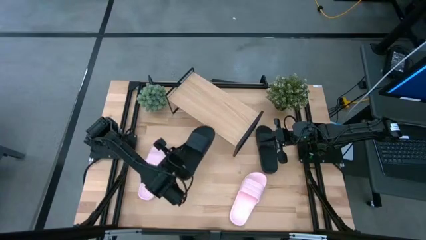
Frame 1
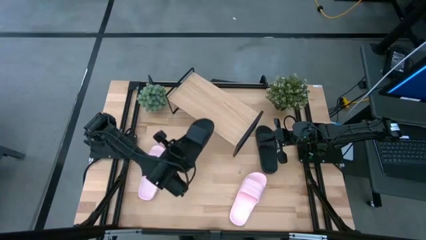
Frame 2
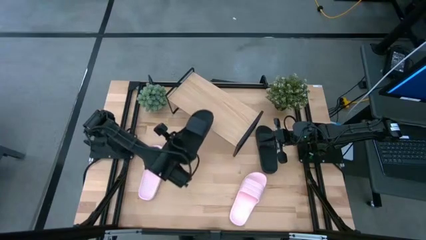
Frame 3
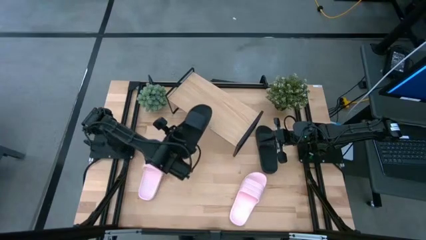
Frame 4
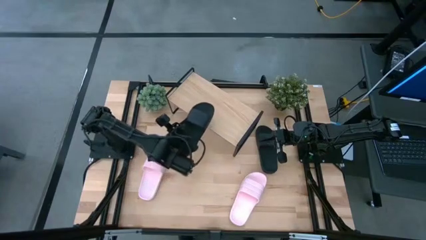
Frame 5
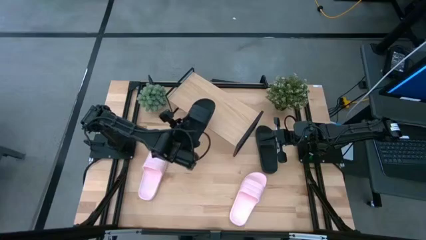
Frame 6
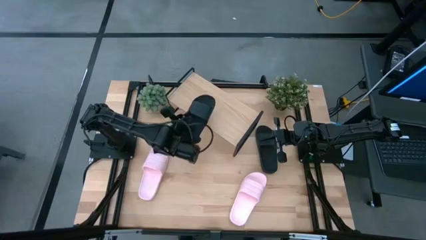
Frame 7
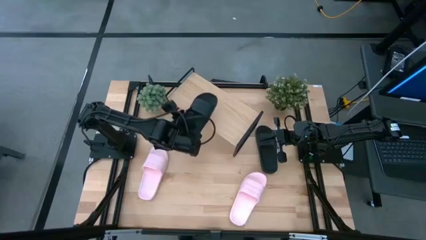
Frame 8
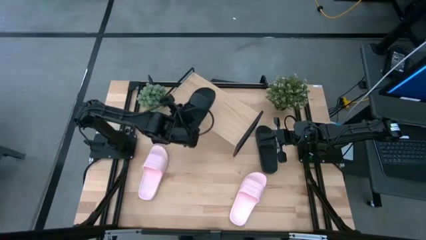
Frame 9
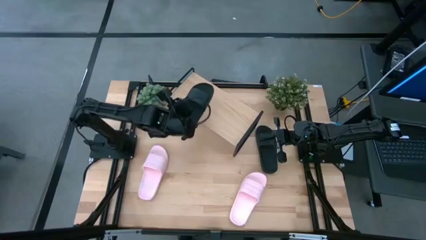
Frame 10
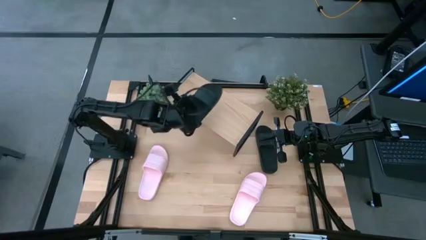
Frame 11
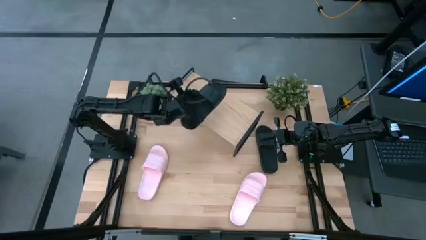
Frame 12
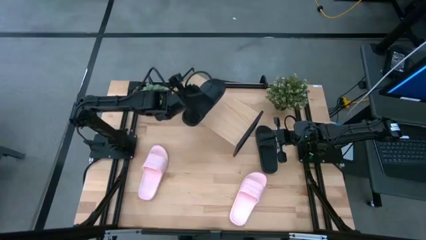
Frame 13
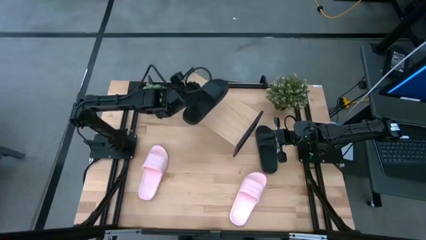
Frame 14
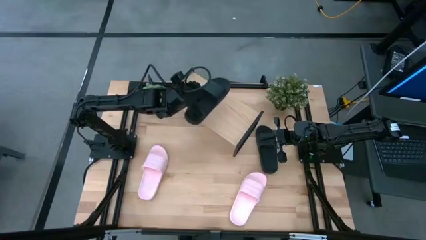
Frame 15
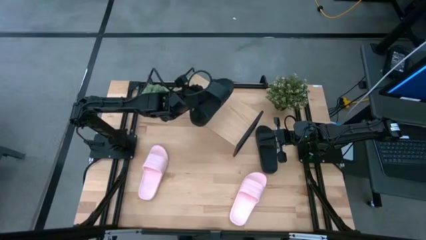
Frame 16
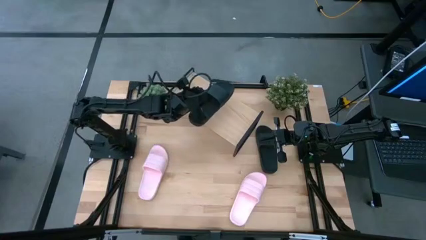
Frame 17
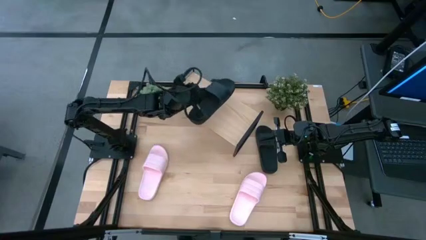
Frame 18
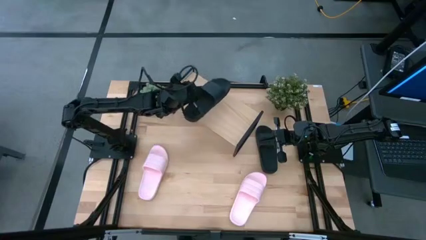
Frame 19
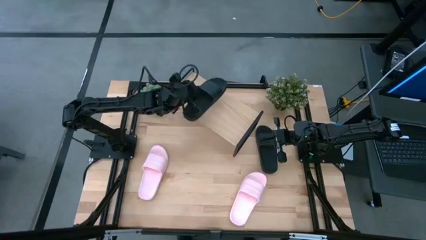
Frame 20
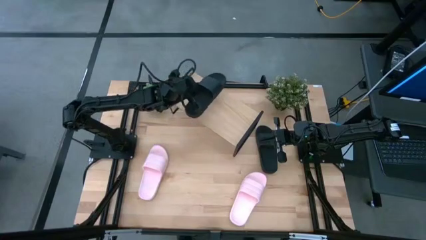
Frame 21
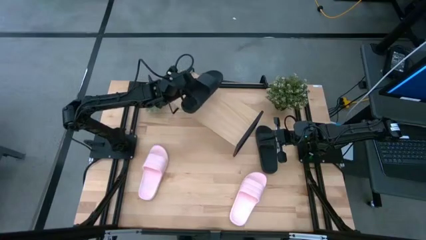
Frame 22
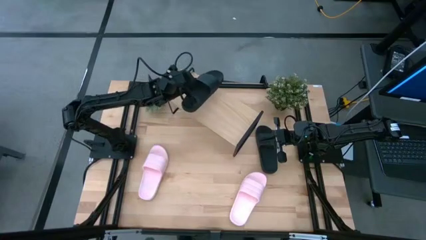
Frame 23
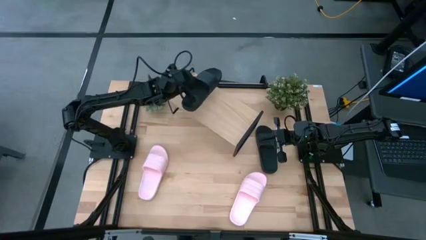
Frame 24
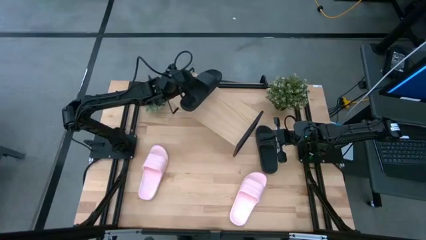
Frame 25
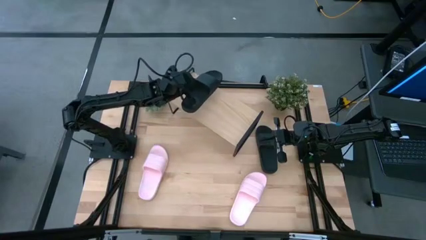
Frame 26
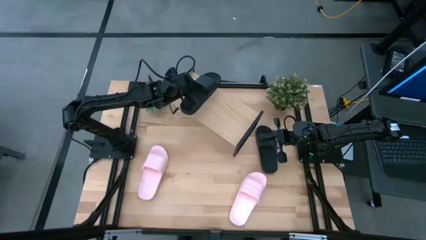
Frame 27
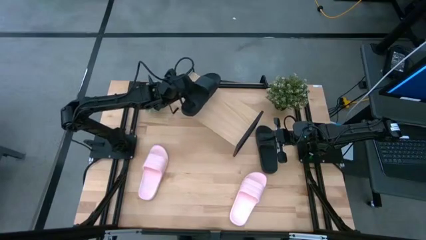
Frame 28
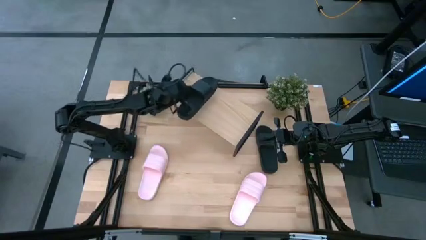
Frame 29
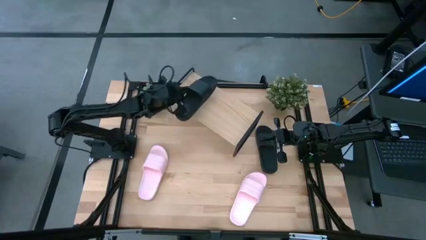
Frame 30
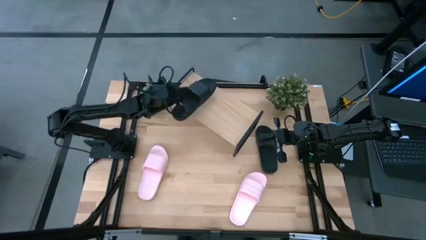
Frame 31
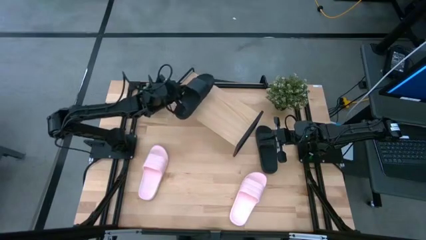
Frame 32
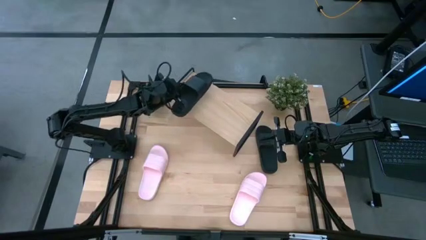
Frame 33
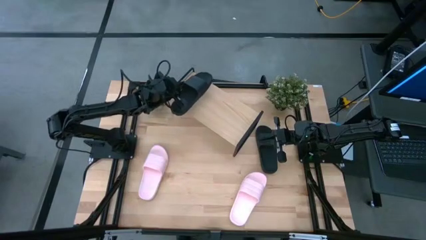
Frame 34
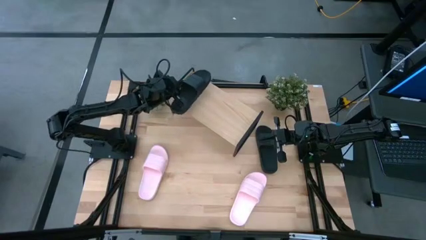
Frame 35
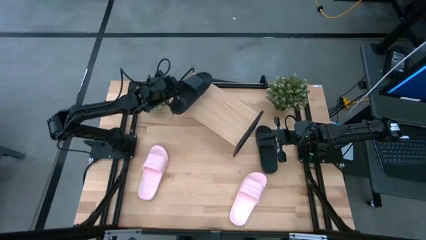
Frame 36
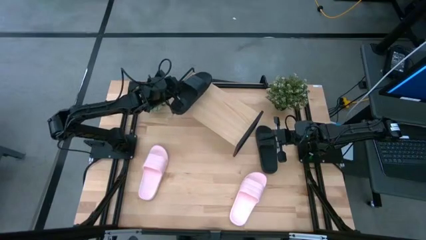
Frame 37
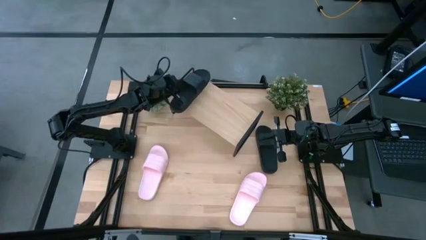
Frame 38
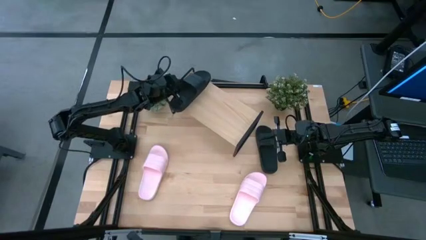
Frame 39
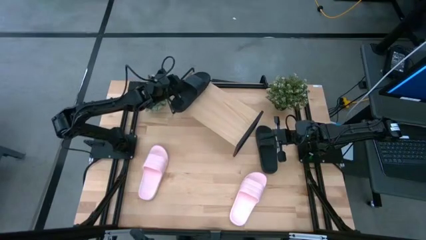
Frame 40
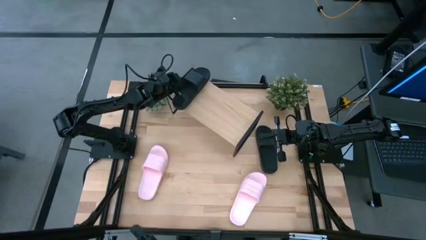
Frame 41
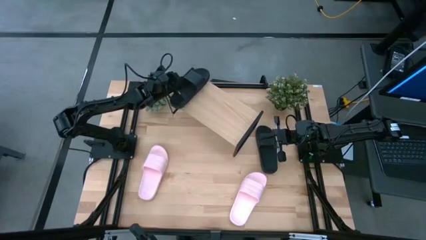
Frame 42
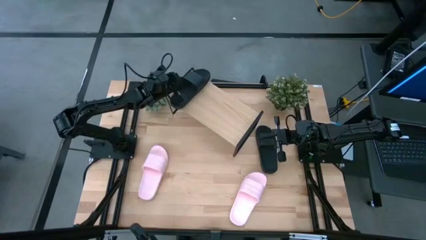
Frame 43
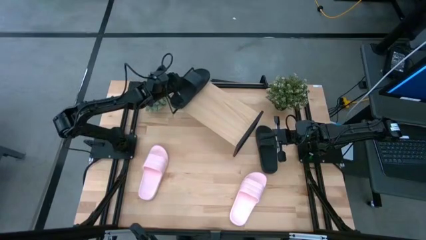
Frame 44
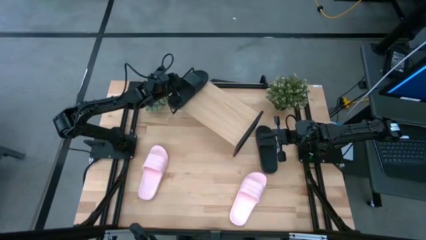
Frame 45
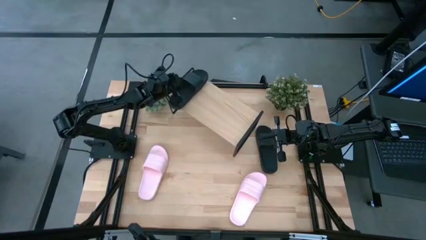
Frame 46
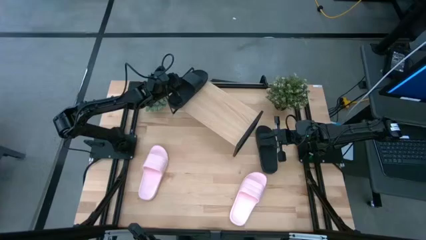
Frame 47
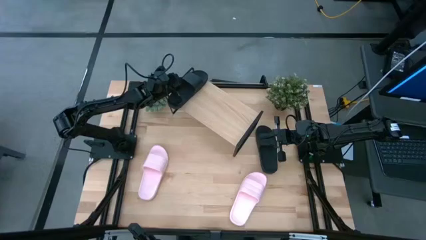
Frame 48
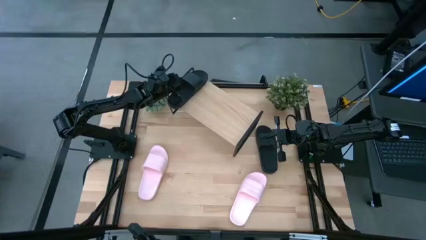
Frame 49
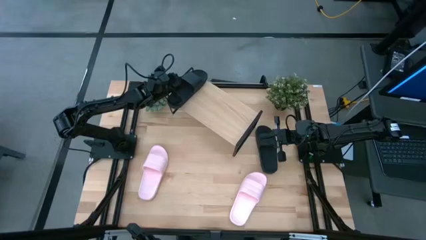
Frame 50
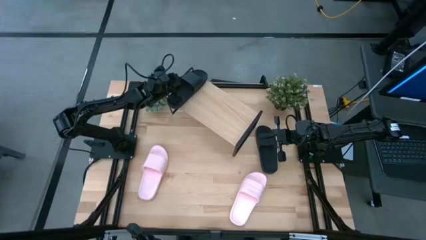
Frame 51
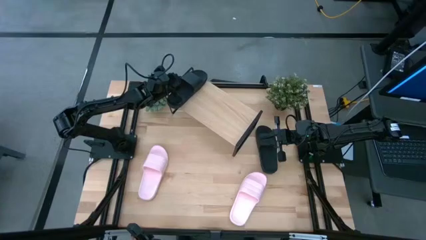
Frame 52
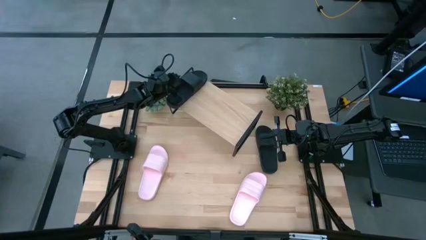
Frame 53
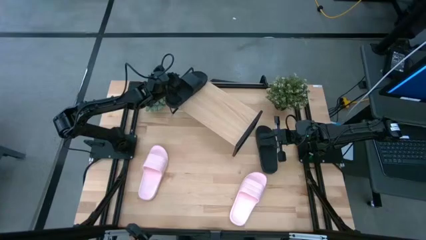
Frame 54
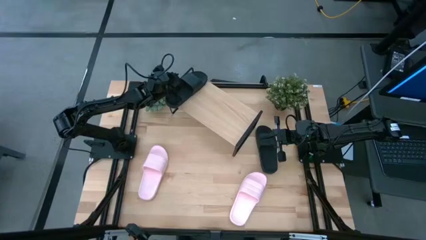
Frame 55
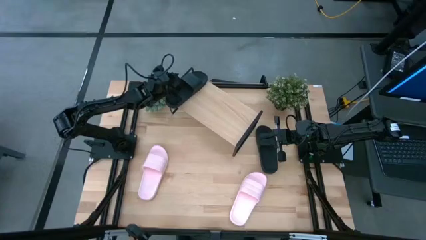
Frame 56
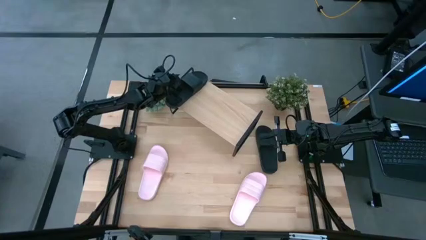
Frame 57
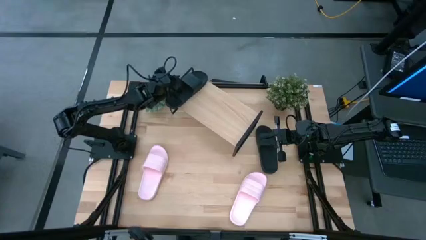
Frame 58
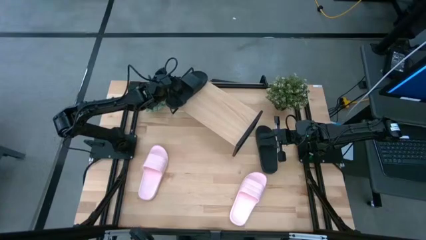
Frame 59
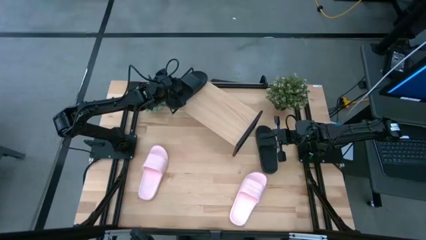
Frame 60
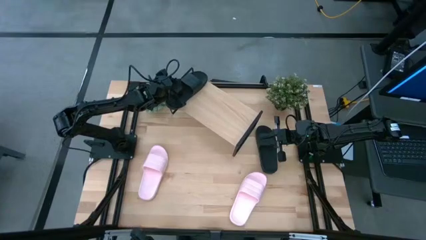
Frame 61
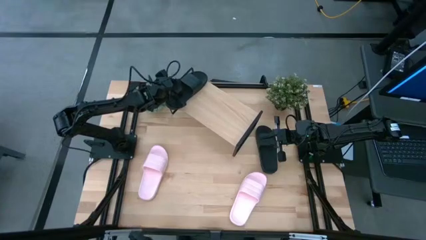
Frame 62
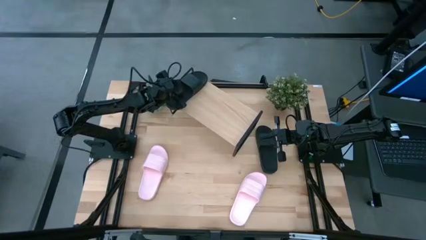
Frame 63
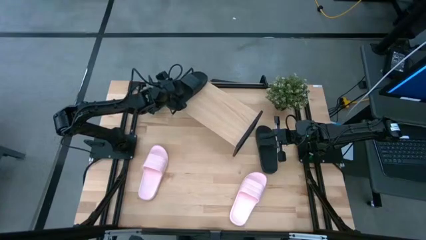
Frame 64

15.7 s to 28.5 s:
Task: Pick and place slides into the shelf
Put the left black slide on the shelf
